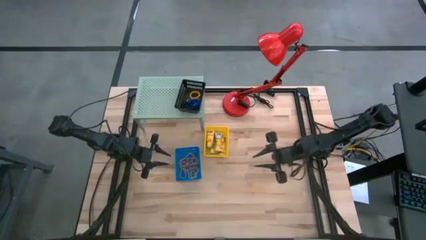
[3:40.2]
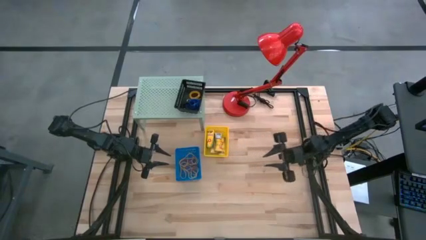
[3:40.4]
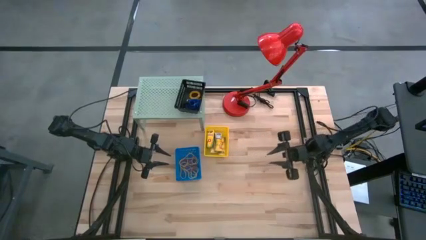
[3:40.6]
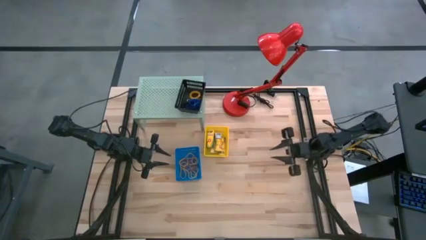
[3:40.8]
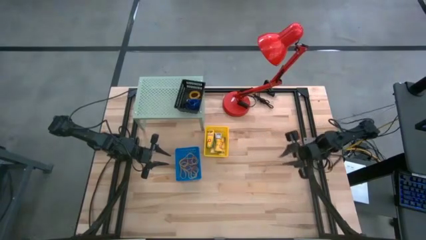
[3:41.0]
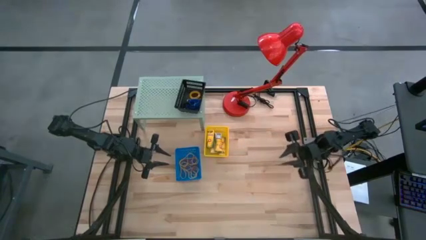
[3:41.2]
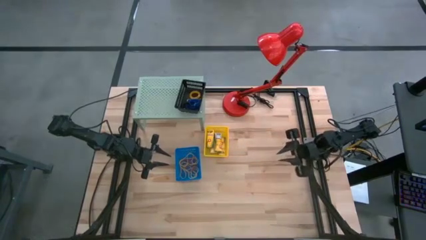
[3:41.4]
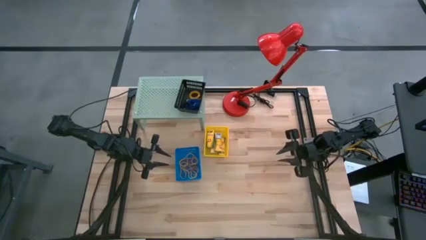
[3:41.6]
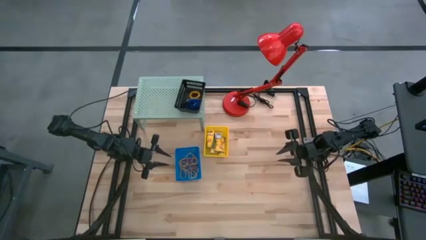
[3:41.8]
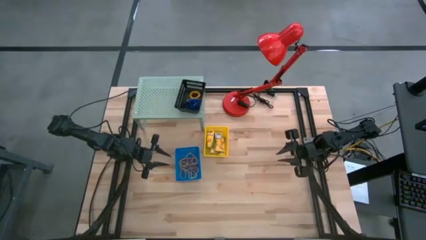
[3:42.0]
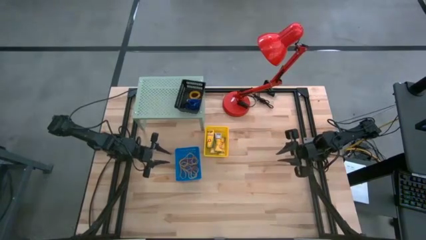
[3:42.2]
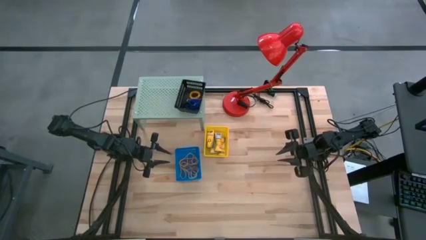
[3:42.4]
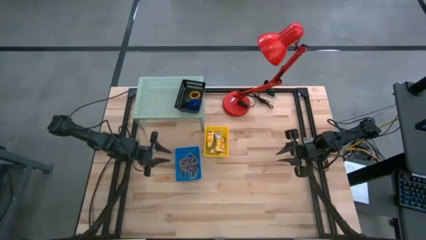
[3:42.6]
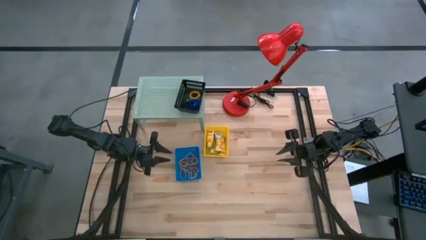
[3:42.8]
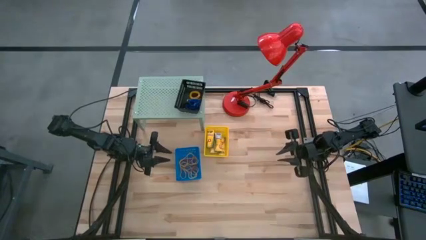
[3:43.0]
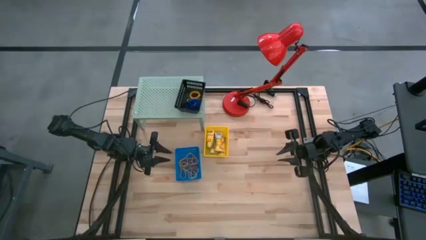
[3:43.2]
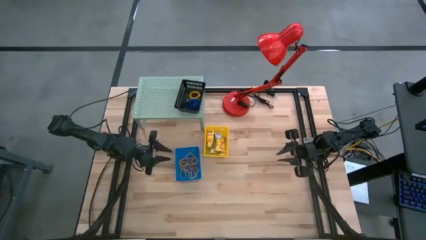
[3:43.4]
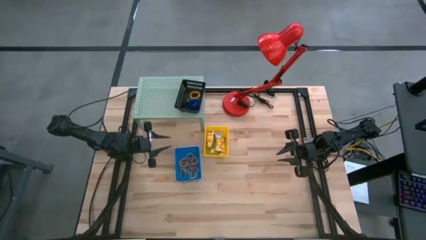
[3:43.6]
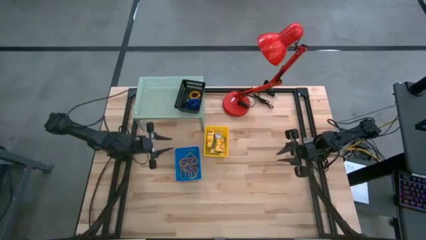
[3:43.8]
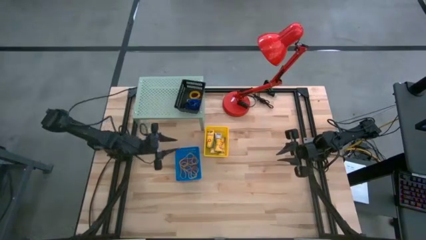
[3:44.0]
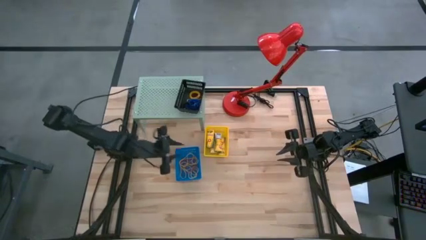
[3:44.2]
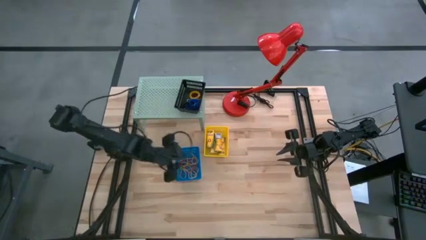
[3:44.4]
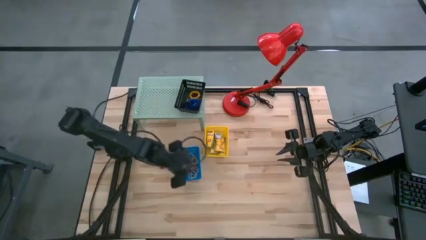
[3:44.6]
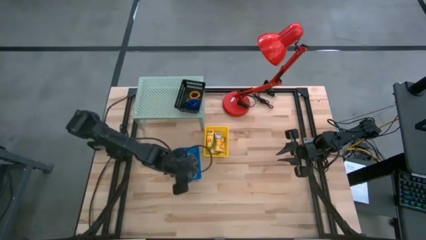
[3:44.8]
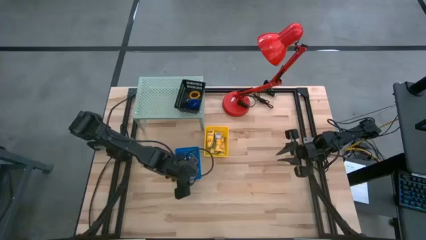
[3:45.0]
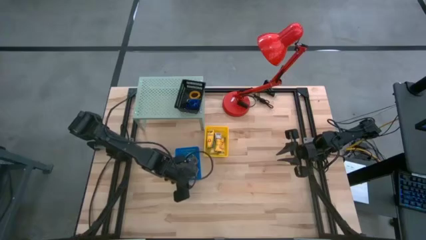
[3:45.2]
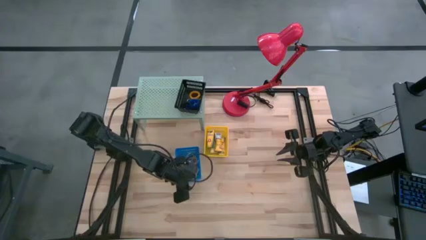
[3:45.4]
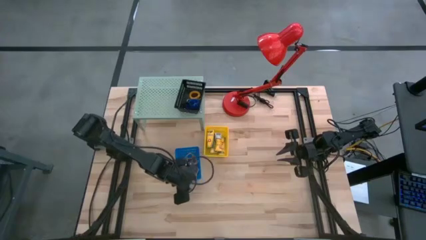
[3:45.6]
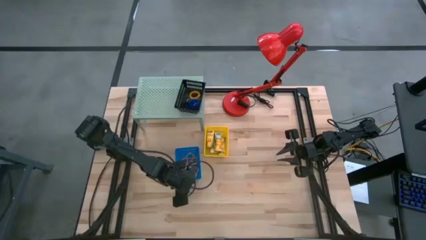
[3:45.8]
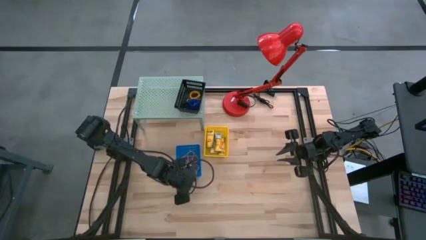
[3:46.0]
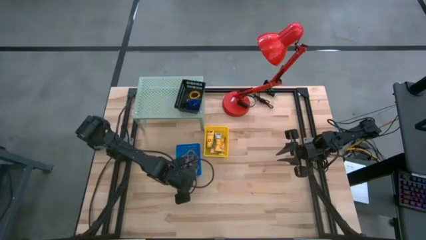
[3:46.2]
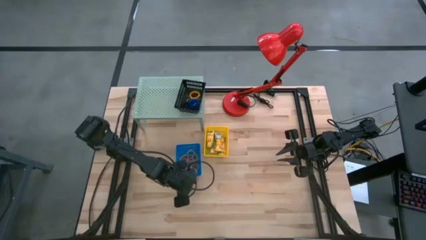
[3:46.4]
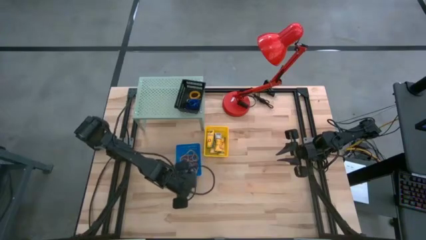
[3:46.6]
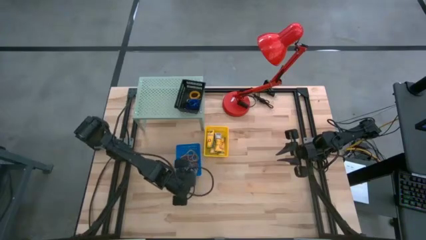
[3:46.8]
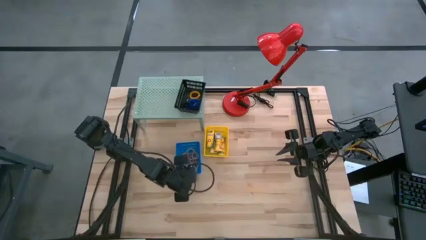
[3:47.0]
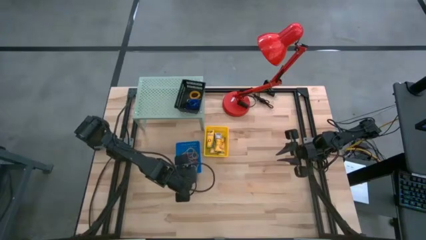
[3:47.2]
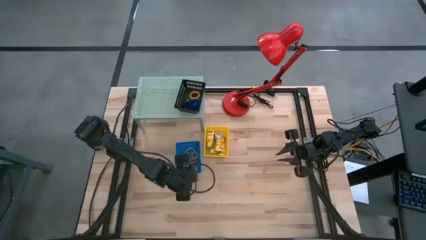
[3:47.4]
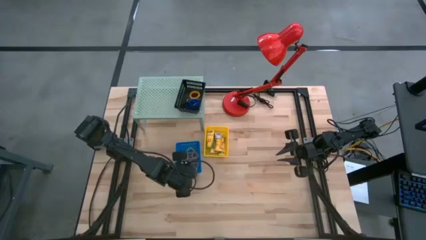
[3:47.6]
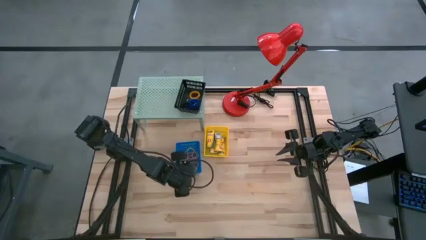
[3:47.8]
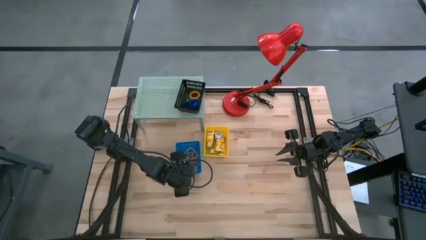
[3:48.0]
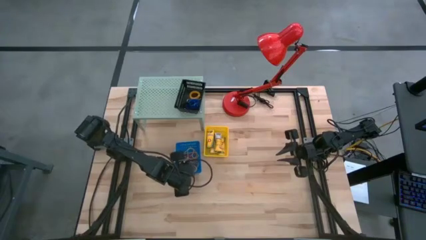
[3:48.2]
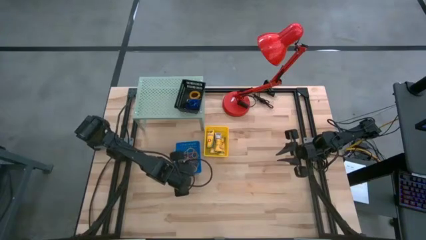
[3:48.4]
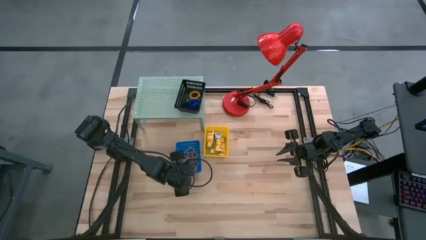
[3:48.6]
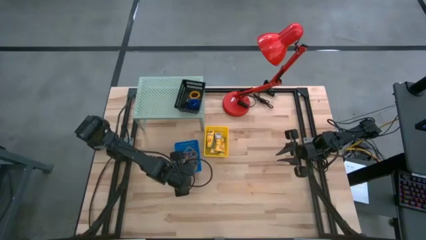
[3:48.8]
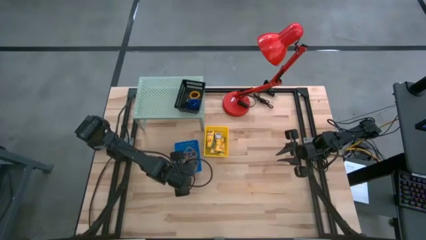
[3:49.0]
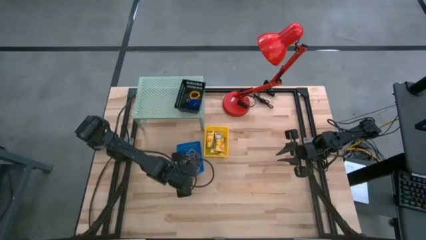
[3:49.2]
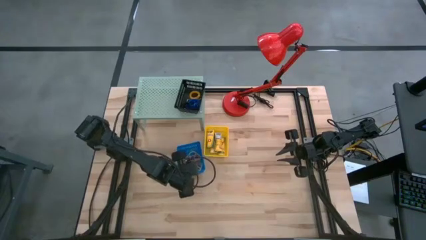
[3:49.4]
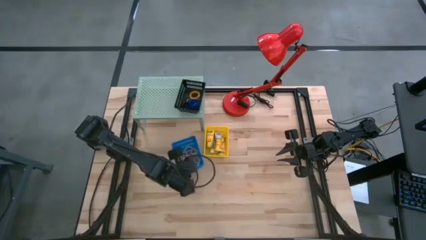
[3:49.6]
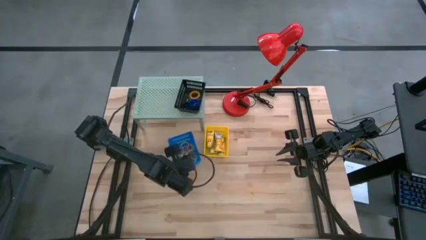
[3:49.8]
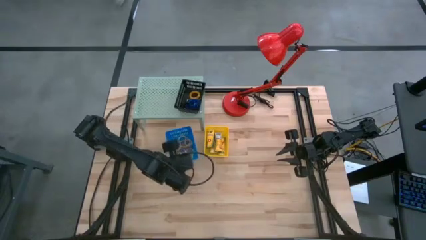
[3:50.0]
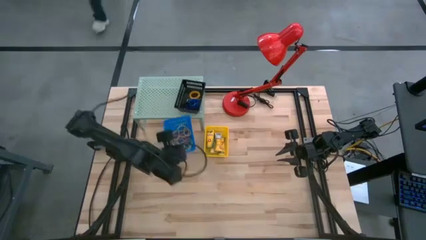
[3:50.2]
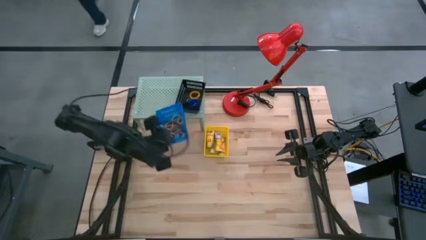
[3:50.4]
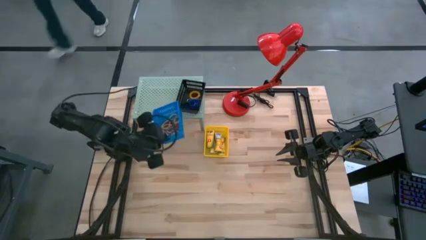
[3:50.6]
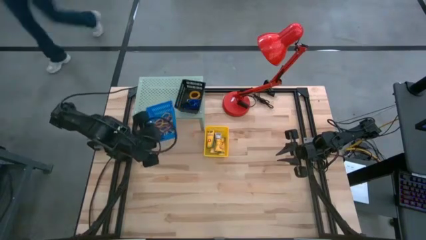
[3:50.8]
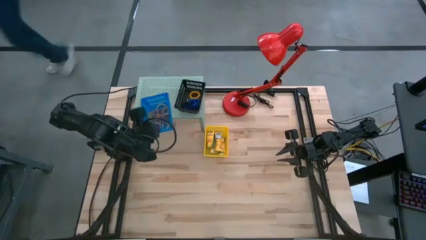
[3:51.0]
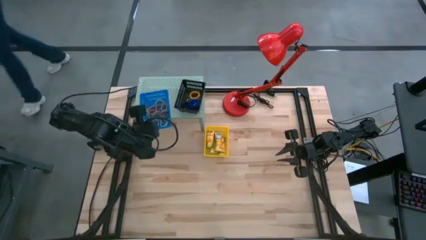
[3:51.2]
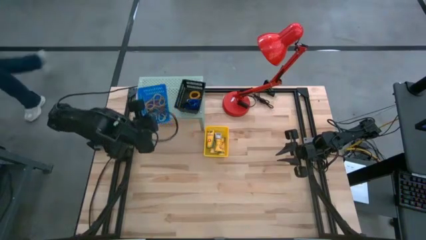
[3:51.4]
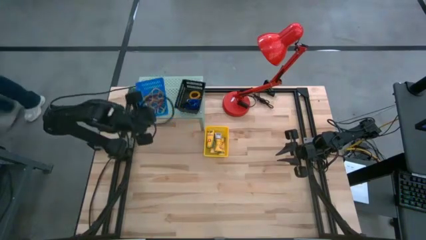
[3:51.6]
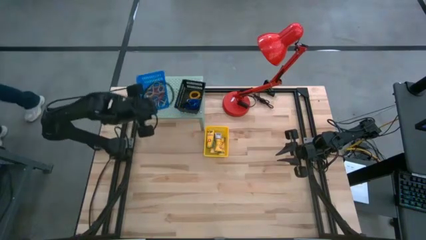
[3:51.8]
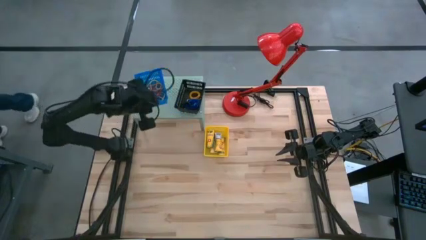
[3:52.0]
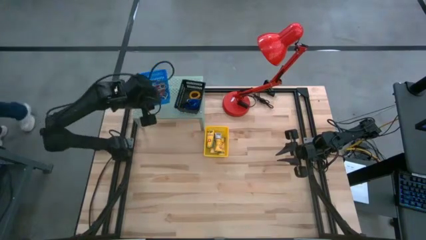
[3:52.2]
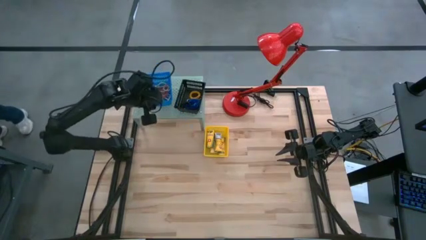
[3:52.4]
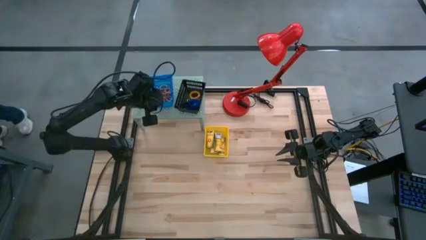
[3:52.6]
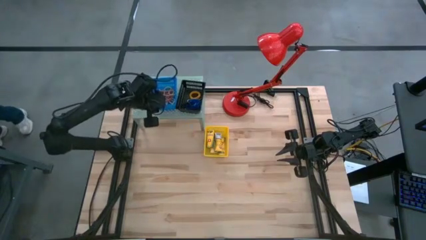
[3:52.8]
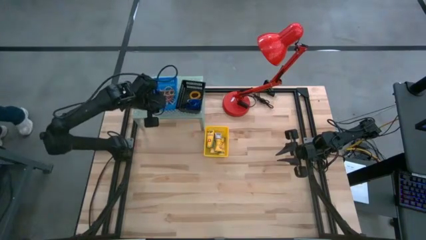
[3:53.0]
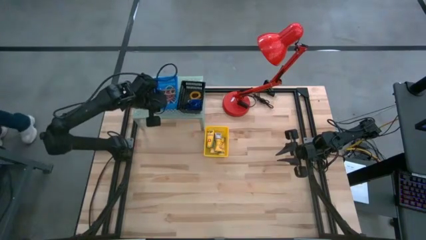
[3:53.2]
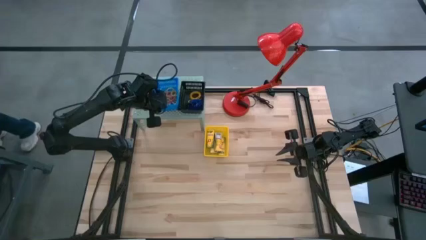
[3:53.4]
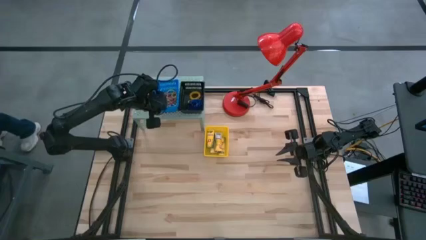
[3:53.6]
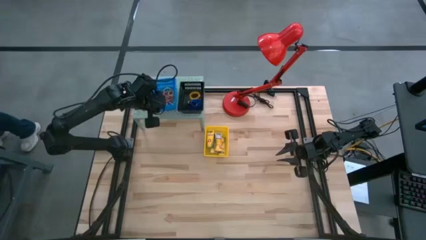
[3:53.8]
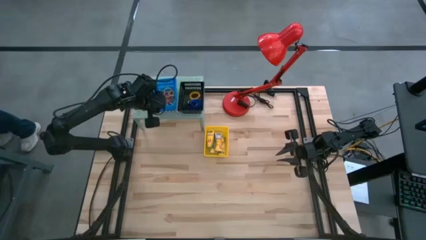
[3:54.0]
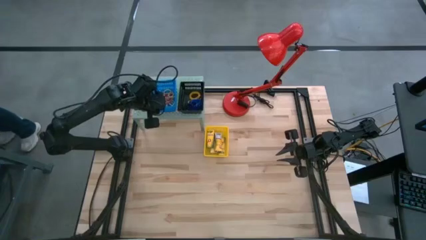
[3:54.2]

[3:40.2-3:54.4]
Task: Pick & Place Office Desk Supplies
Put the blue basket filled with rubber bands on the shelf

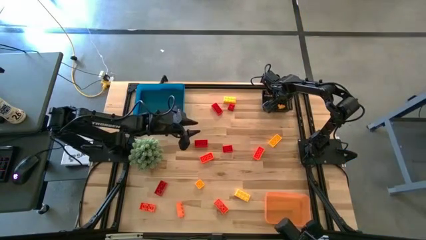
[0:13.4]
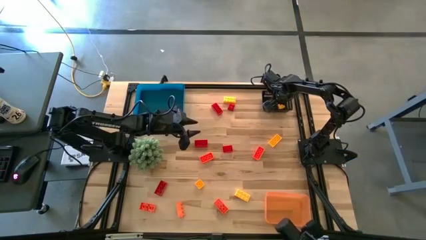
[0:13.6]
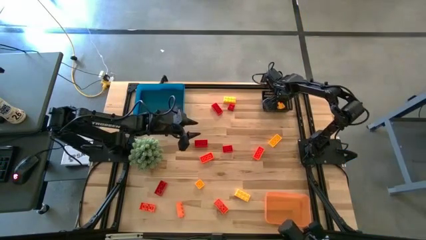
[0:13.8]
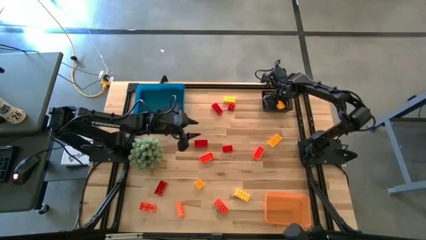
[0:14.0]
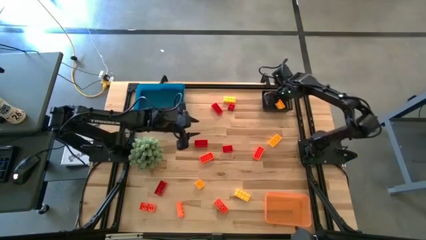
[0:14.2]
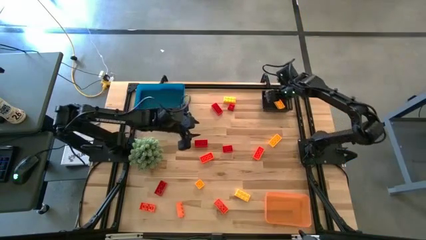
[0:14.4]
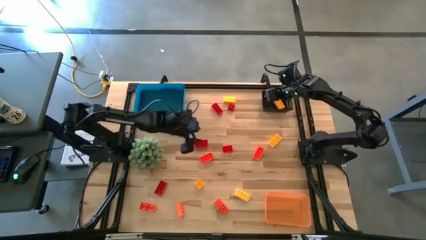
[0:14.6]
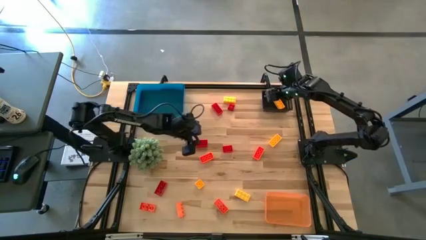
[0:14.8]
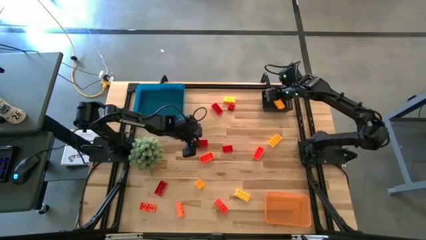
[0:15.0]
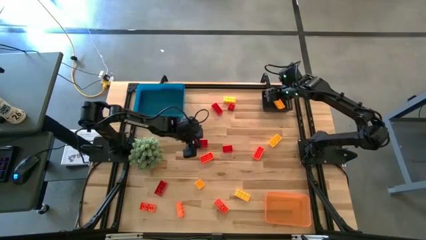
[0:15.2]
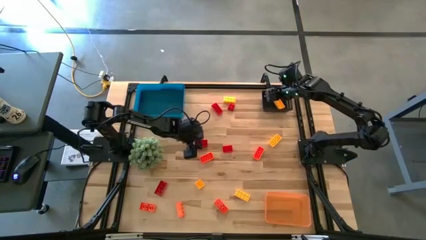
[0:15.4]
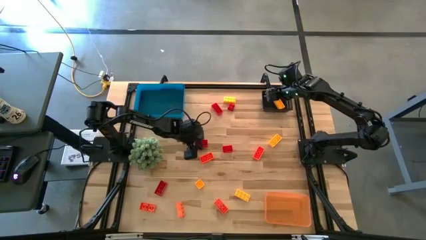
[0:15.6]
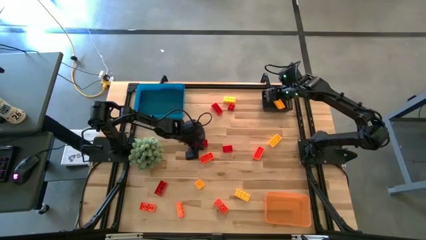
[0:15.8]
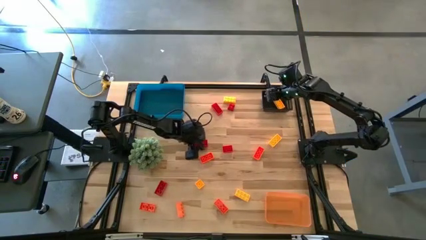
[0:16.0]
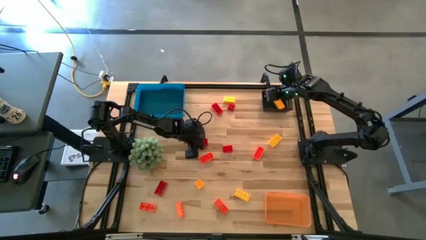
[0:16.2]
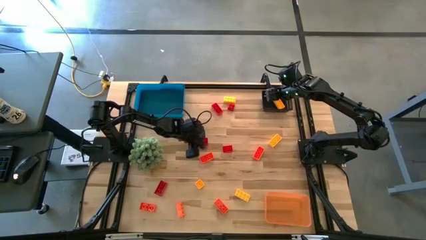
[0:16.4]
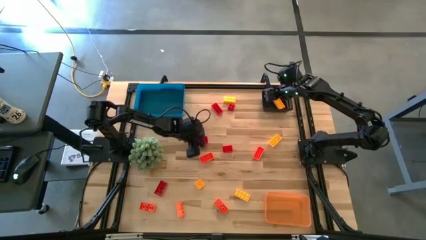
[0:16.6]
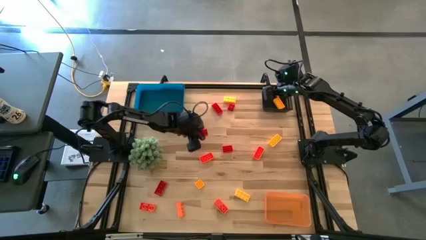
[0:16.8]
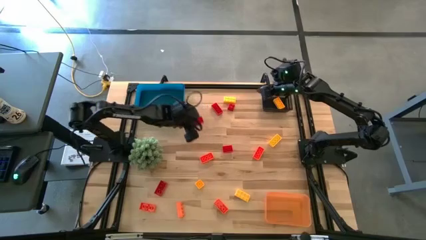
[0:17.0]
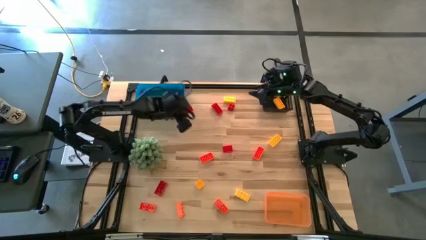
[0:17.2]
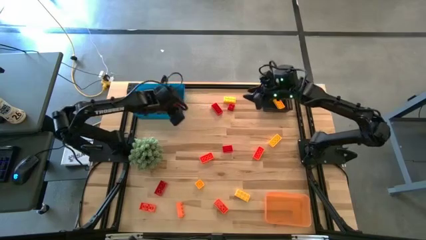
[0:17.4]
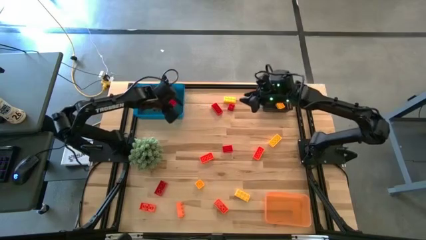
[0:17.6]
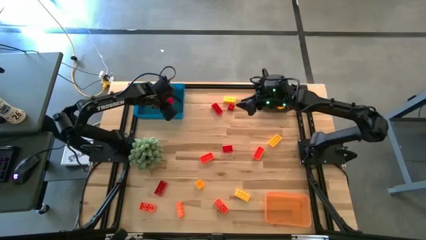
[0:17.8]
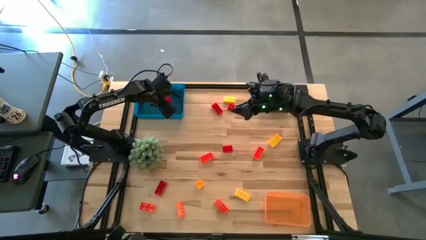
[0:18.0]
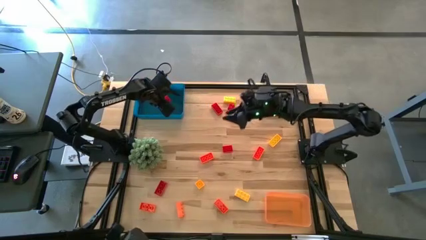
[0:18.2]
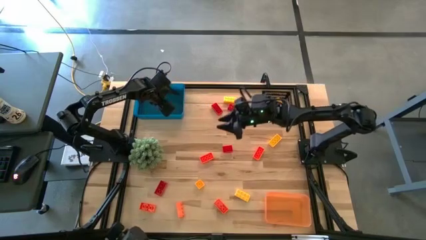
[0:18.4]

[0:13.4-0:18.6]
Task: Sort & place blocks by color
Put the red game piece into the blue bin
